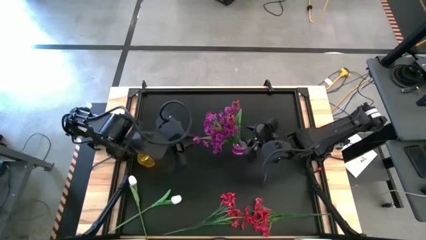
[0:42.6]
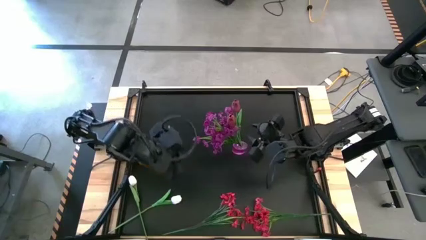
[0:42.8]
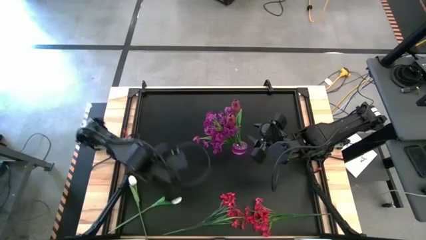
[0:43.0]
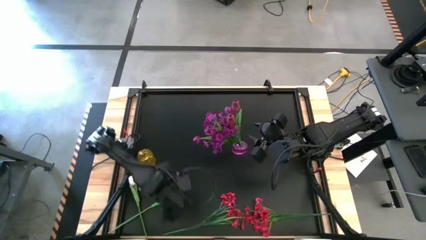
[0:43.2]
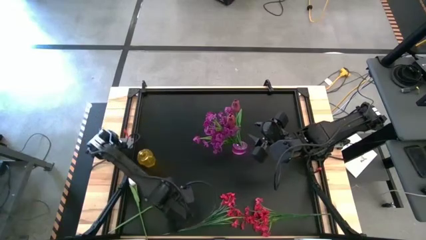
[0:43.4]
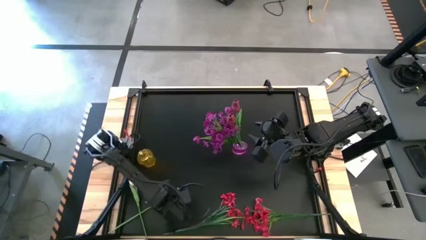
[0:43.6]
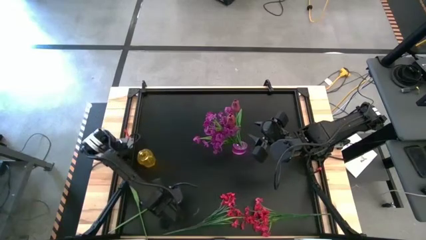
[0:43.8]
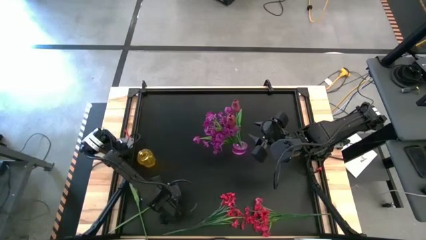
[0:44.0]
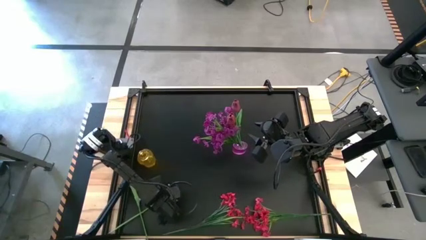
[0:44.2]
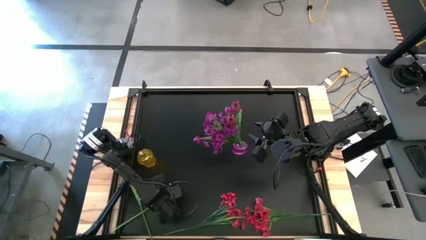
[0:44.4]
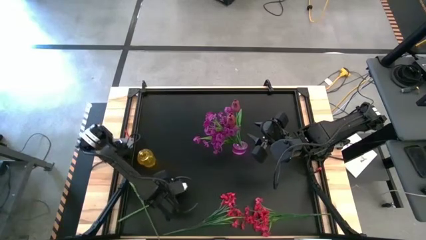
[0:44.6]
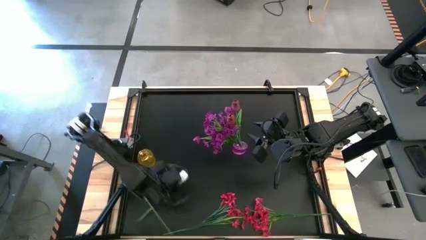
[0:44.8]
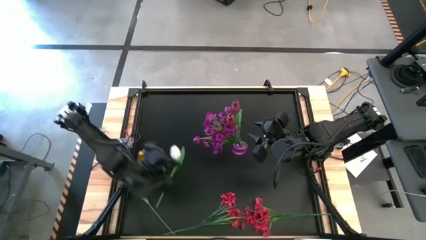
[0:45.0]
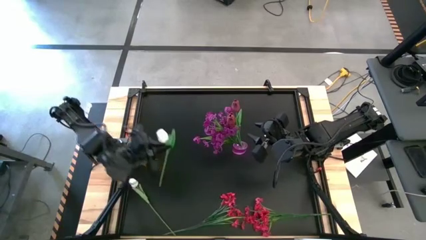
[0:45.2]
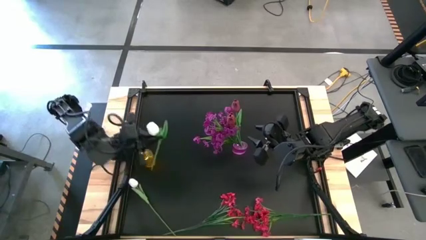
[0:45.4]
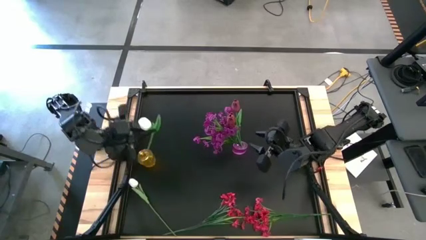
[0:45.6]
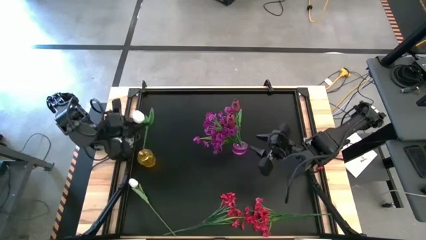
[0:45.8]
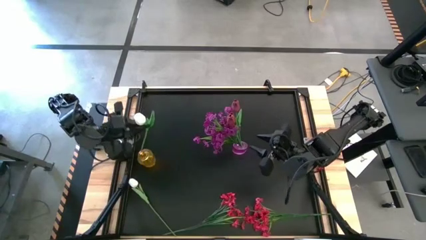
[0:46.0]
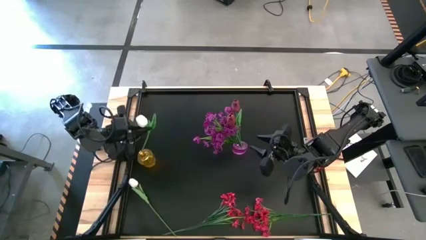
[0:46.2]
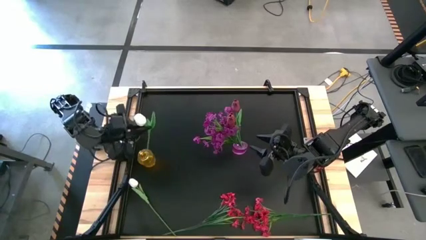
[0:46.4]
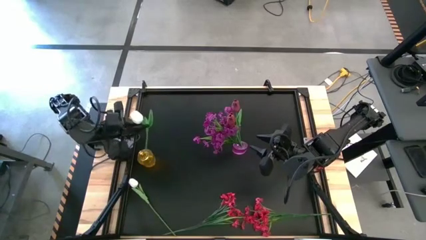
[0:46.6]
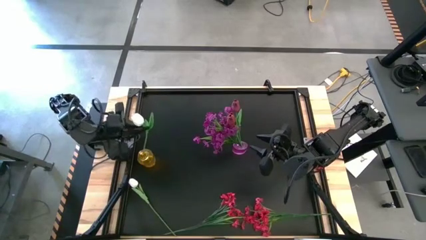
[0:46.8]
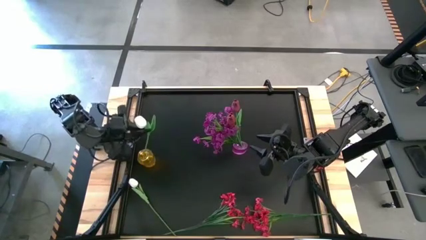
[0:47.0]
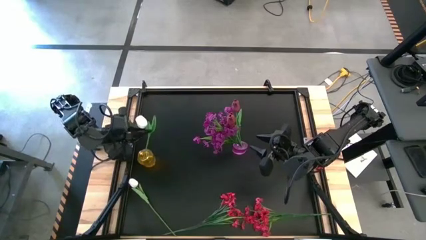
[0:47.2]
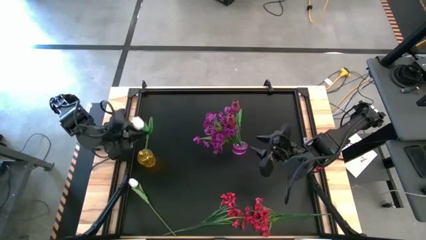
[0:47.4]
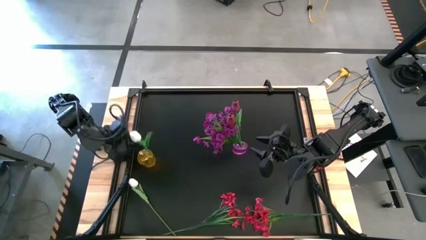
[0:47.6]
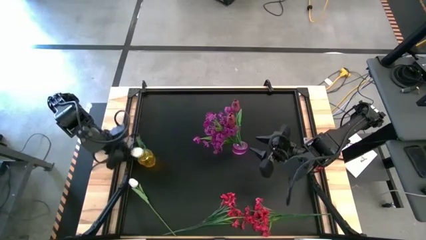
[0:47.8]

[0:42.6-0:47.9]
Task: Sort flowers into vase by color
Put the right white tulip into the yellow flower vase

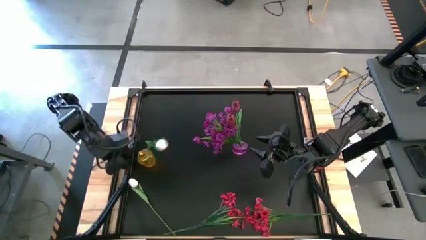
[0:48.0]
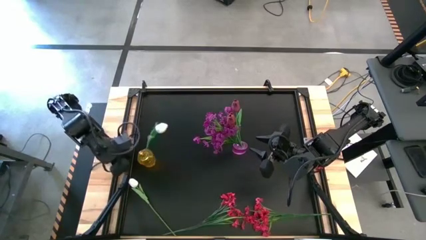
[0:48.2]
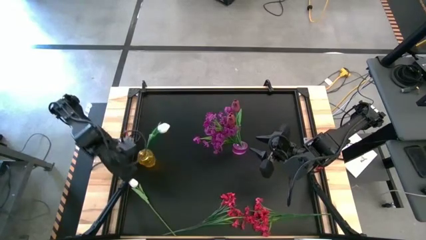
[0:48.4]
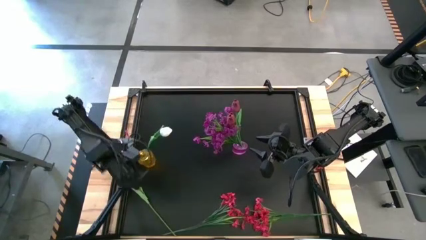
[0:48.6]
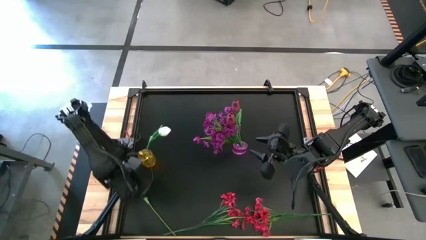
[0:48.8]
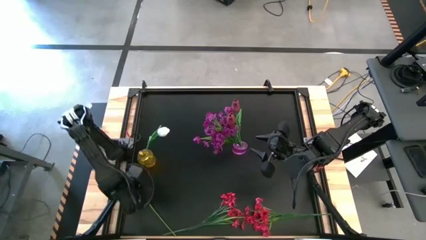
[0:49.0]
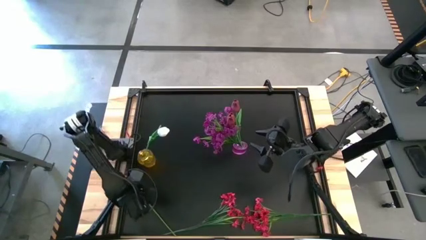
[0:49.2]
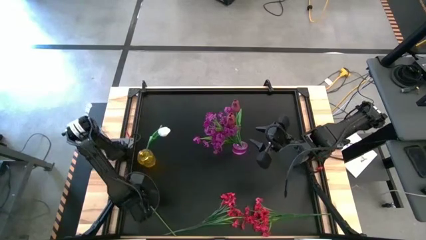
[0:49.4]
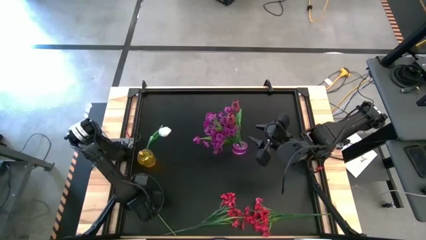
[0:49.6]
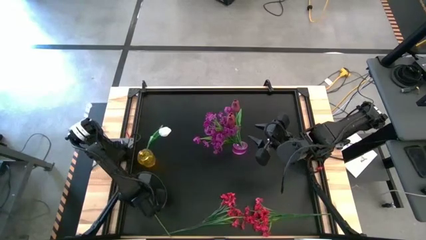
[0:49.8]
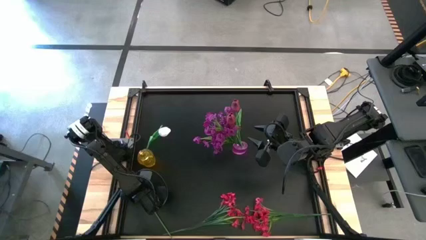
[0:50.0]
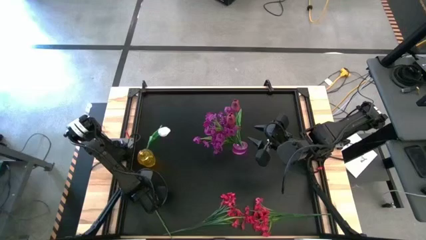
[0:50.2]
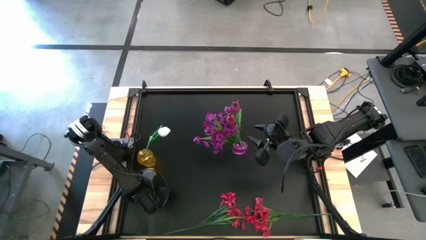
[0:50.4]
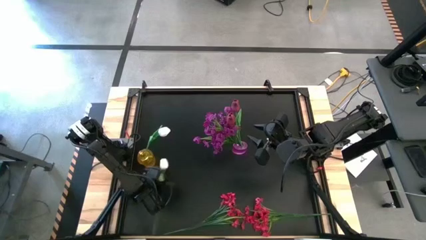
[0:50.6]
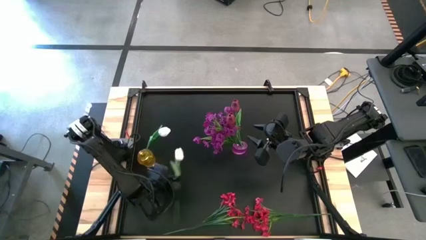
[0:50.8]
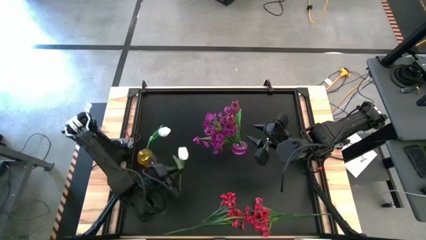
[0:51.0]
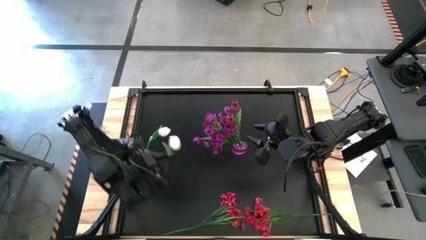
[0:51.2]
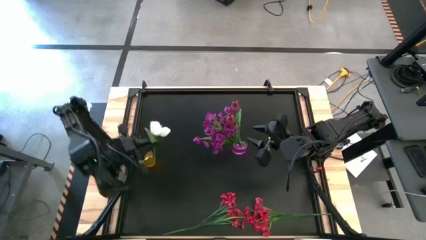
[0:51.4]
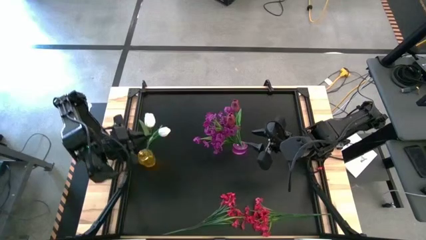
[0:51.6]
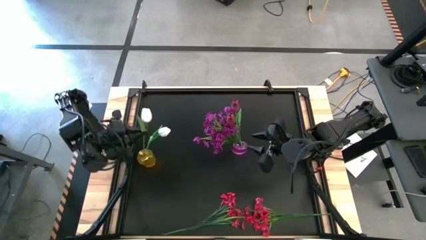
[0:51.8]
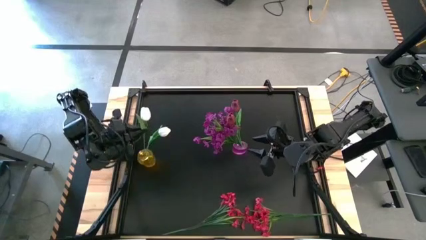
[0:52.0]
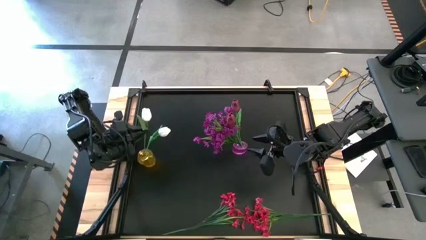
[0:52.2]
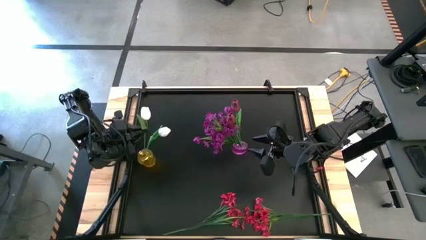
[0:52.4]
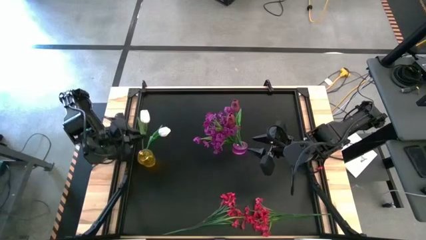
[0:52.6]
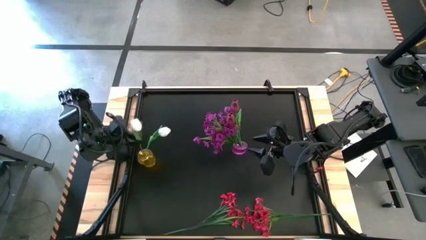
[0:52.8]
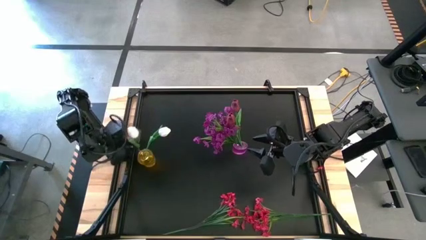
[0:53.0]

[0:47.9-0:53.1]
Put the white tulip into the yellow flower vase

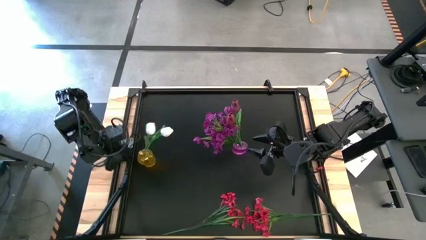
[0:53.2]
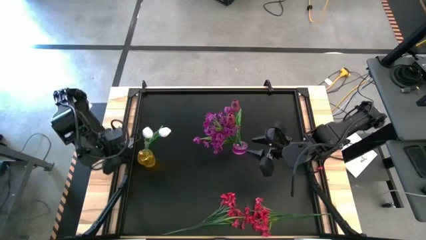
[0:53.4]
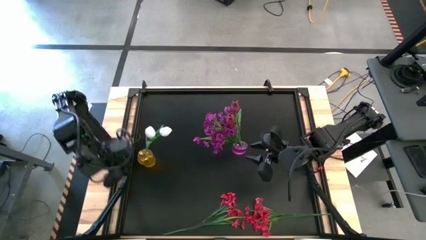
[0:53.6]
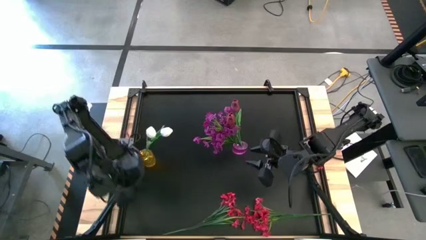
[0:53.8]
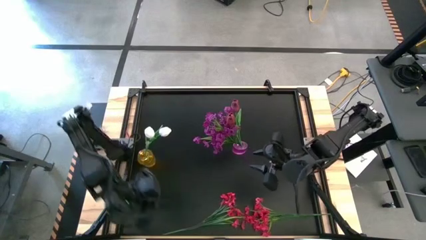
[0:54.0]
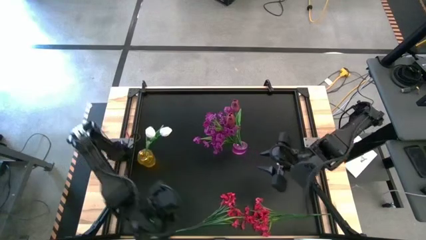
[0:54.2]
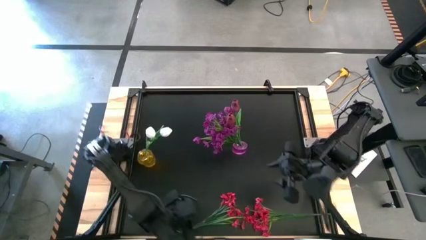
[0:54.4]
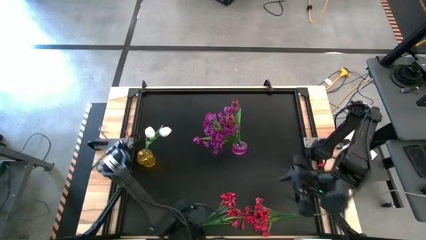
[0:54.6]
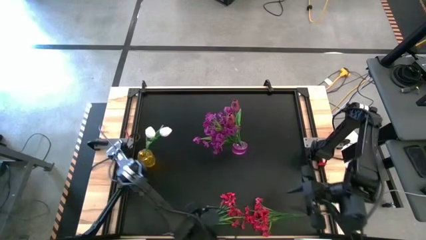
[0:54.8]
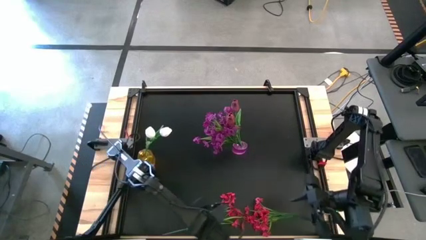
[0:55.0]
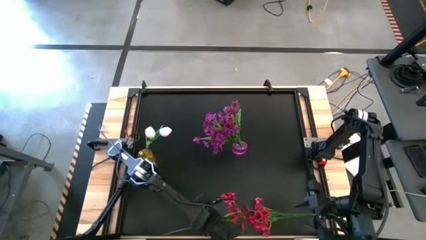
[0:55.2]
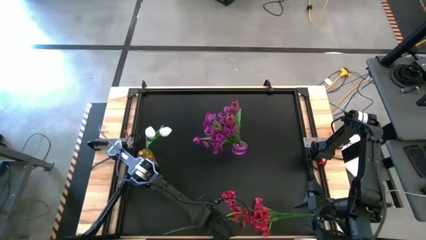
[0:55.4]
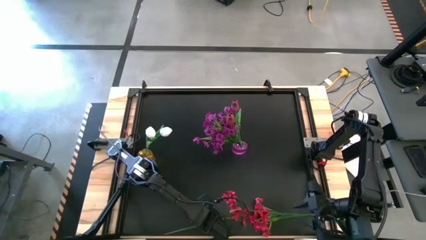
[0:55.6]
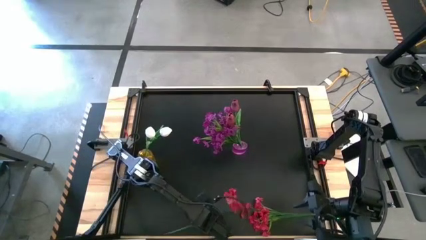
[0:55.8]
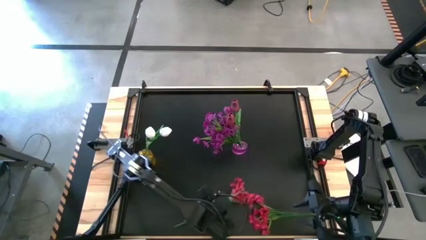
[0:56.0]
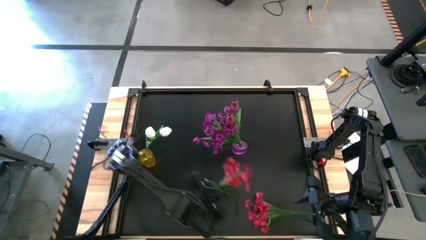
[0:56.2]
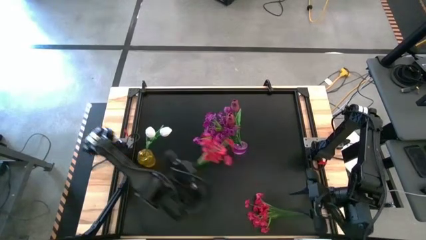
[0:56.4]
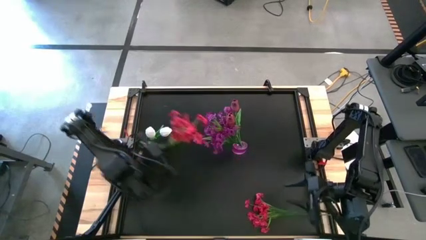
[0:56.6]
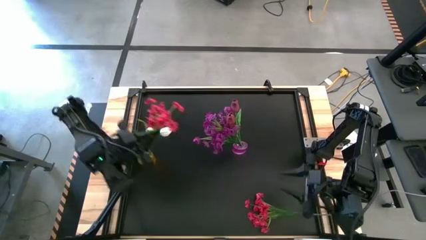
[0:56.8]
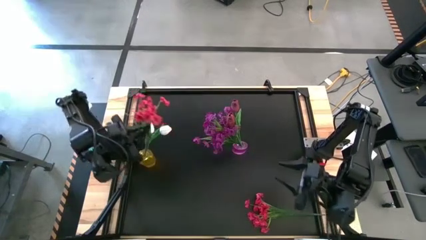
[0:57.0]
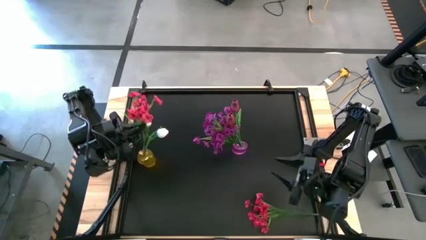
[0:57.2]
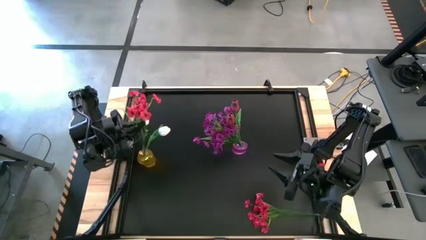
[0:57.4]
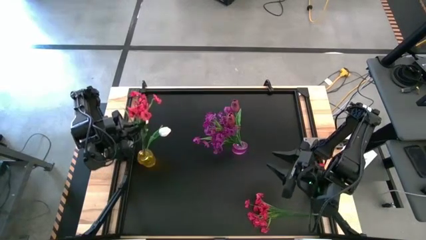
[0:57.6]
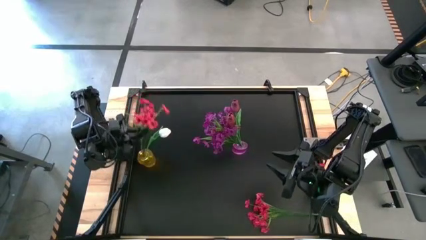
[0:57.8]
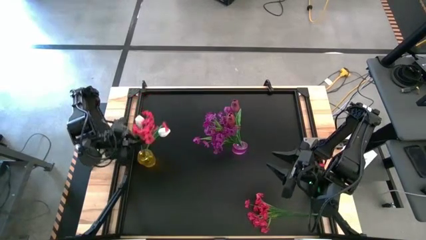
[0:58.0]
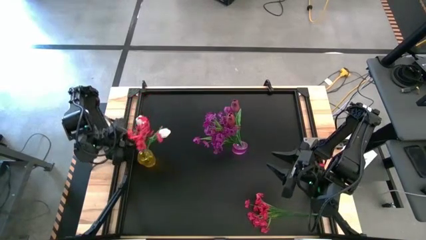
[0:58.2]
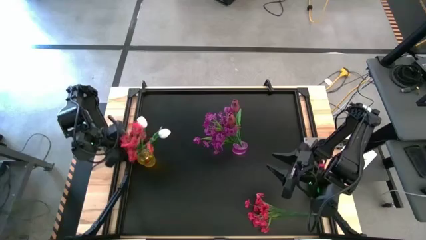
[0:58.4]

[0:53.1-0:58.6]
Put the left red flowers into the yellow flower vase
